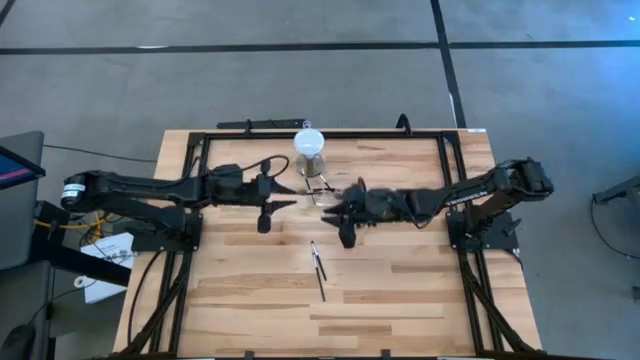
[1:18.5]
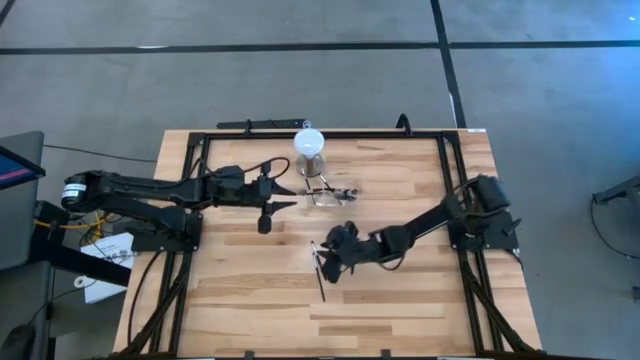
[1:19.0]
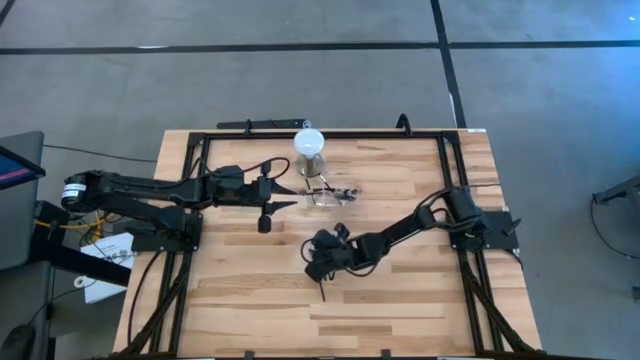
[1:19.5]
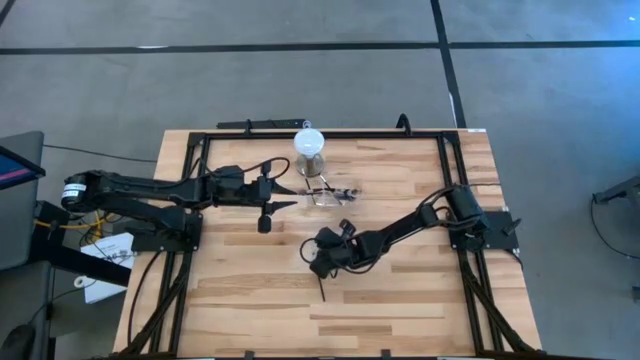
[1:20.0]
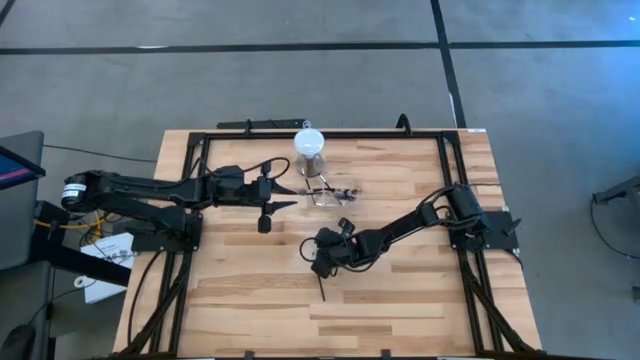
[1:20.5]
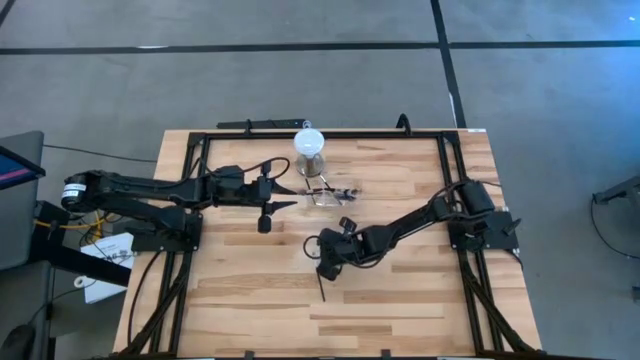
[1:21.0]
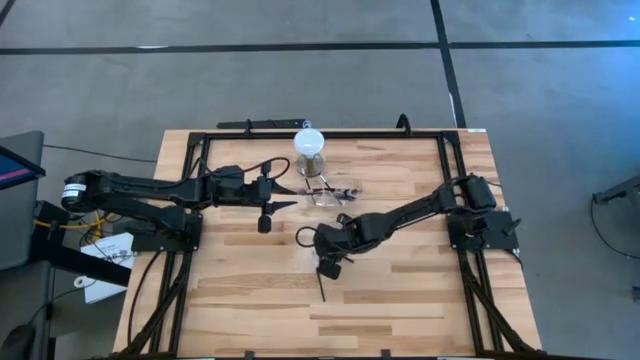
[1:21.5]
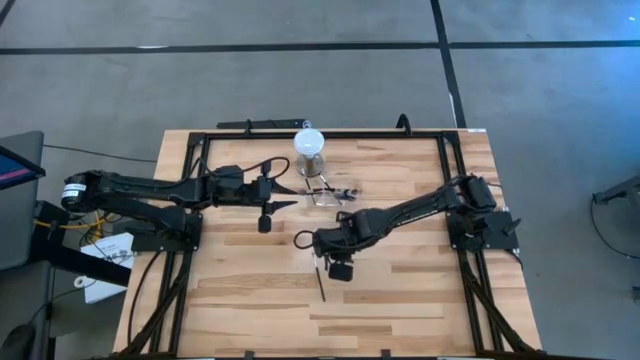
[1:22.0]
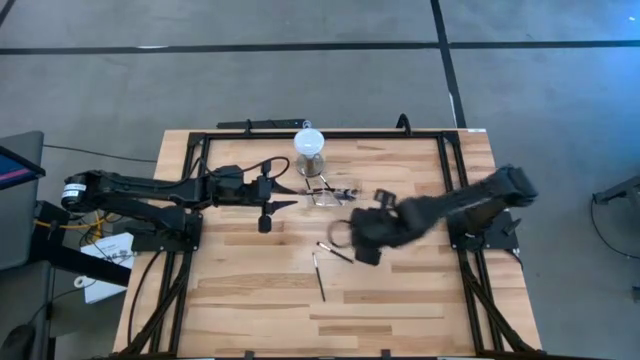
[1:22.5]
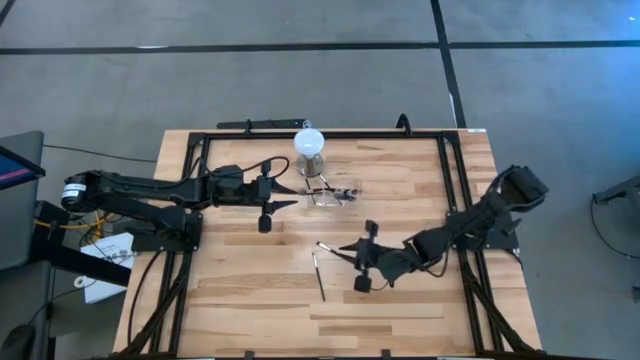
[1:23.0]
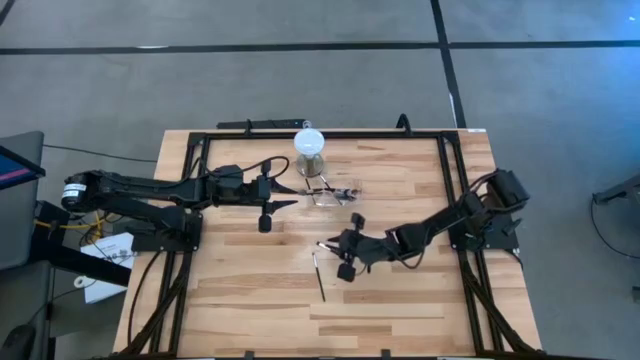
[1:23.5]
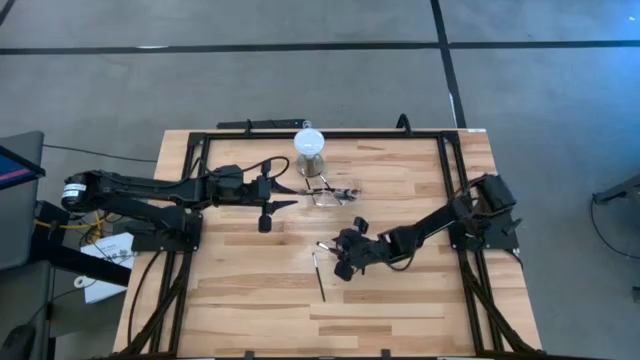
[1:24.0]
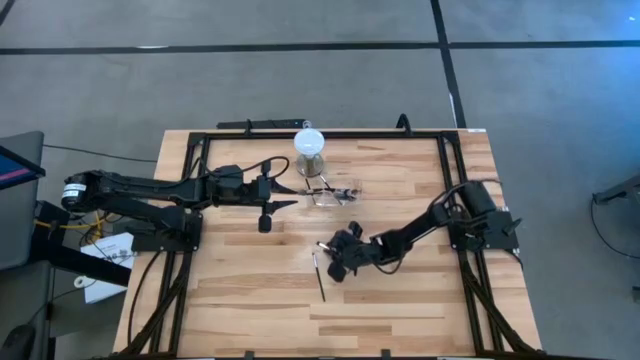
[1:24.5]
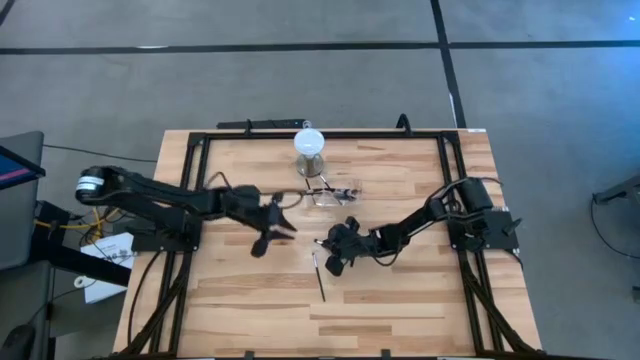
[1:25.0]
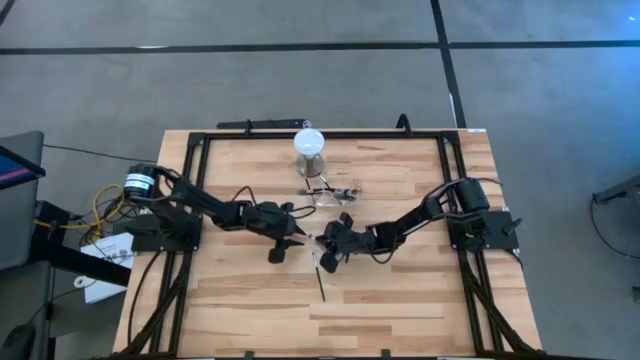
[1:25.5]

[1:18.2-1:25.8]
Task: Put items in baskets/containers
Put the black eyeshadow brush into the transparent organizer

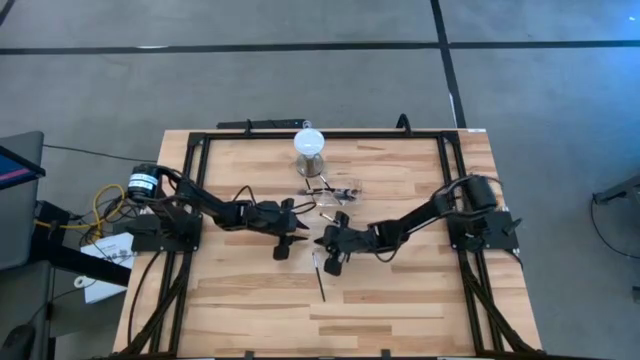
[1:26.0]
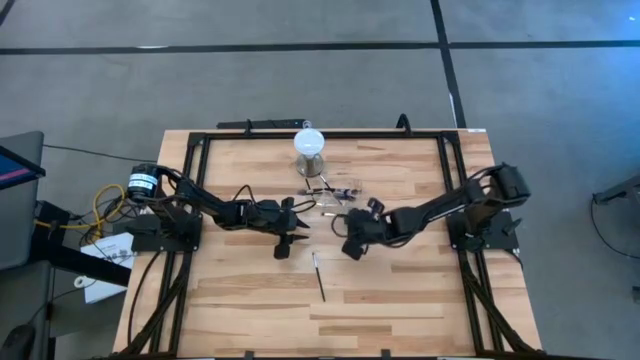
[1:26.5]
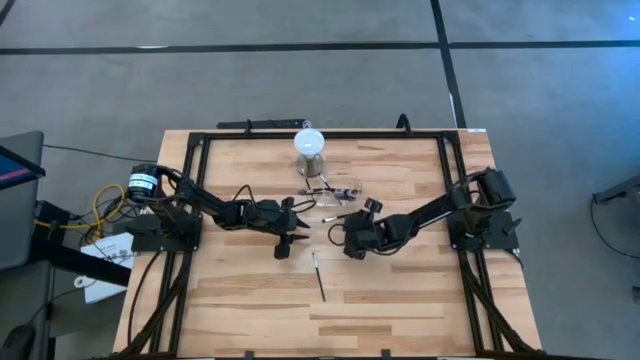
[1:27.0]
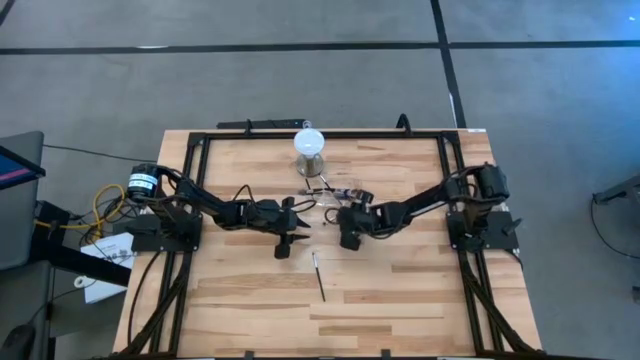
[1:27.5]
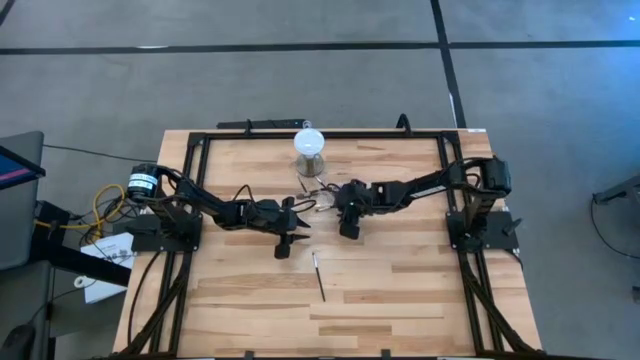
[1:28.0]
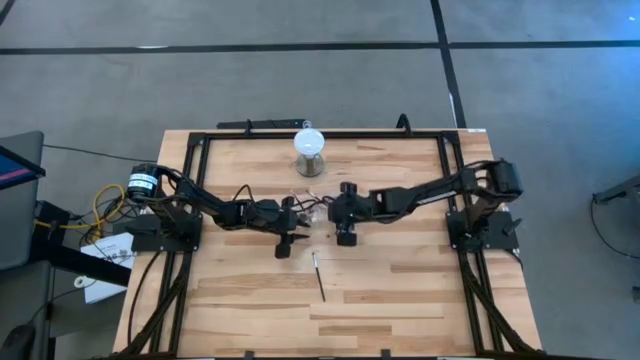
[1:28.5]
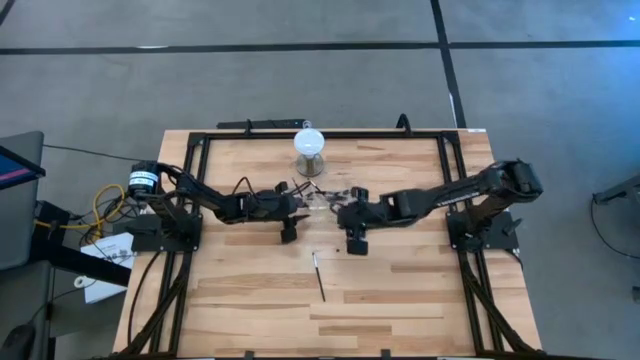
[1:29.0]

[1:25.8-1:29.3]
Adjust the transparent organizer

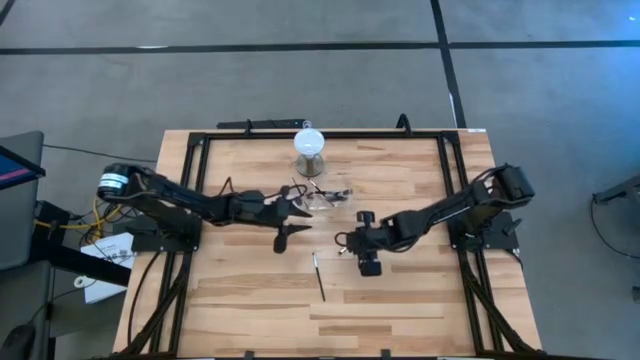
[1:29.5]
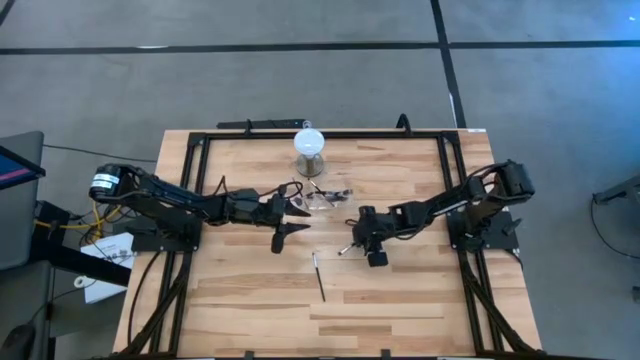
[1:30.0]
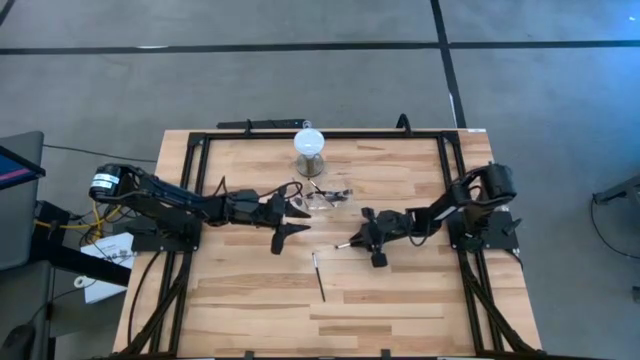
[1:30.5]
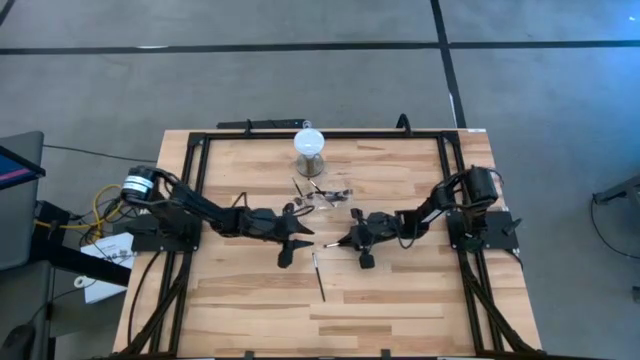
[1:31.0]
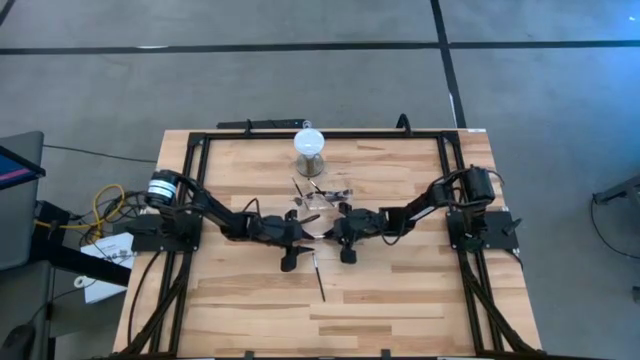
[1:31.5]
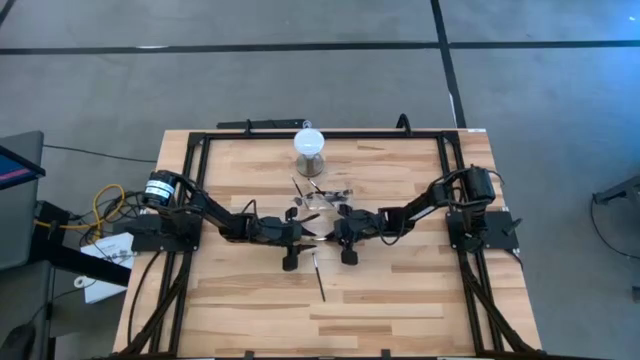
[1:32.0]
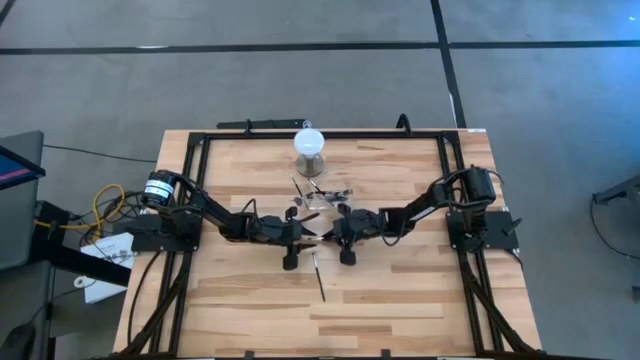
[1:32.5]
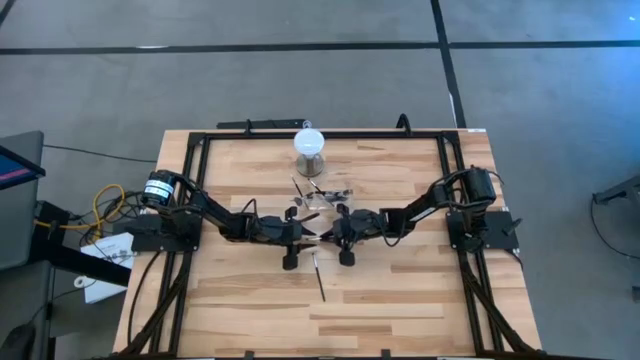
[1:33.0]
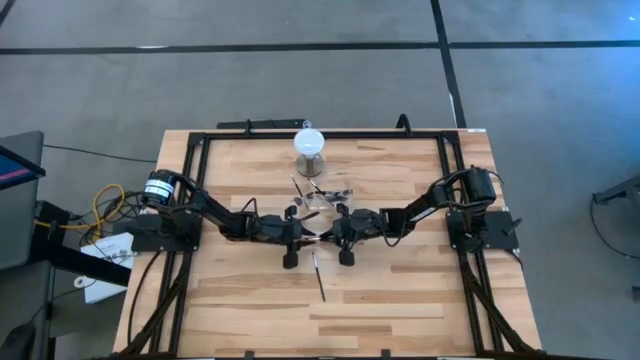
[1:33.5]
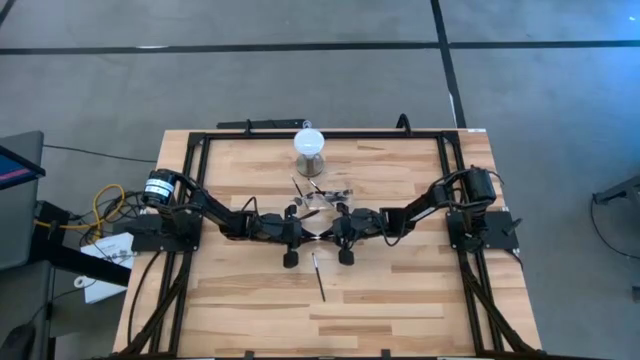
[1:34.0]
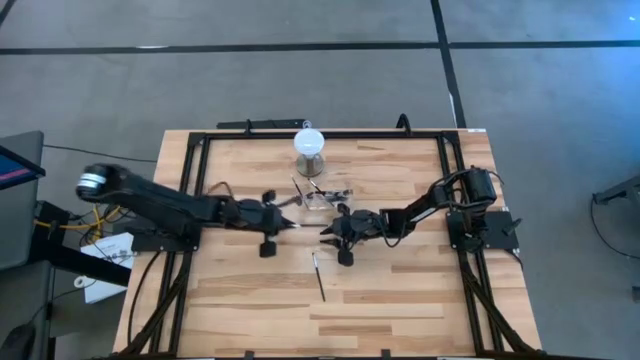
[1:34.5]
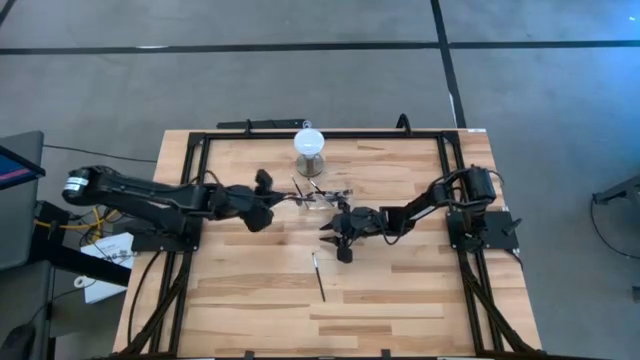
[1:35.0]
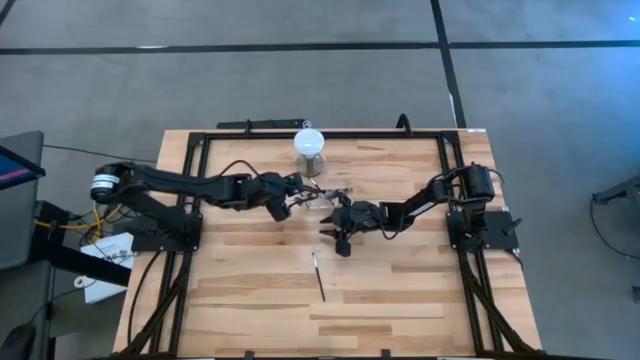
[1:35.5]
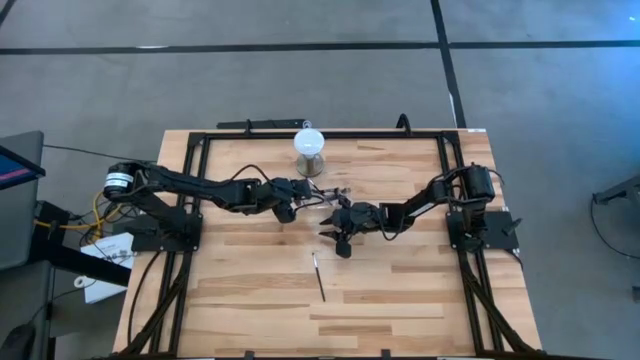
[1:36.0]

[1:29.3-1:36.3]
Put the black eyeshadow brush into the transparent organizer

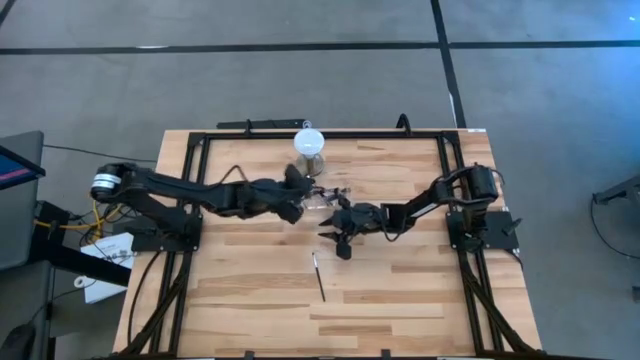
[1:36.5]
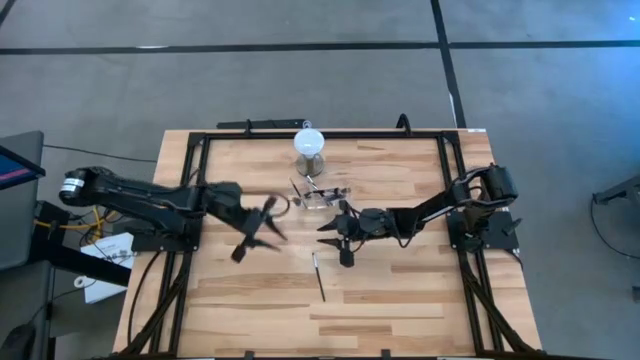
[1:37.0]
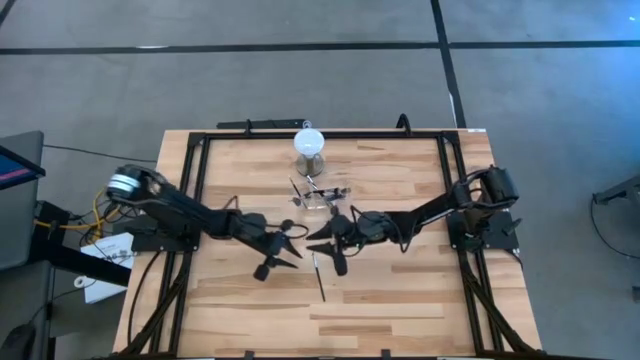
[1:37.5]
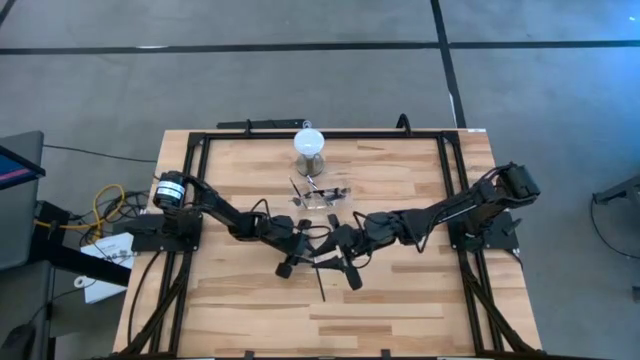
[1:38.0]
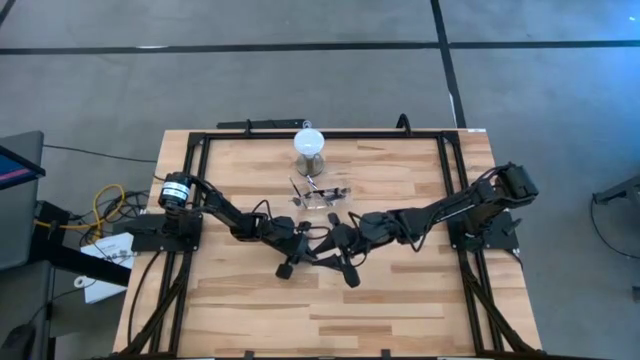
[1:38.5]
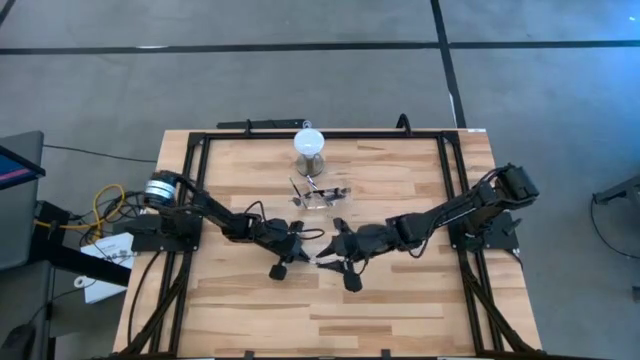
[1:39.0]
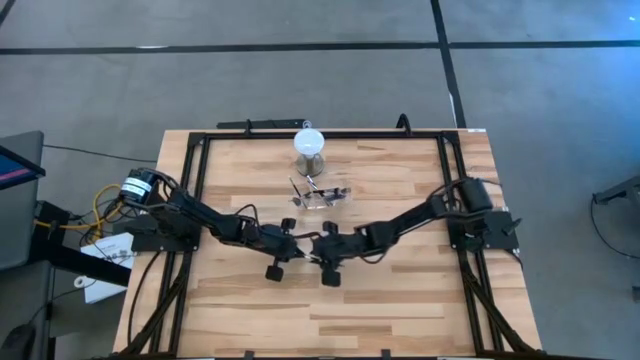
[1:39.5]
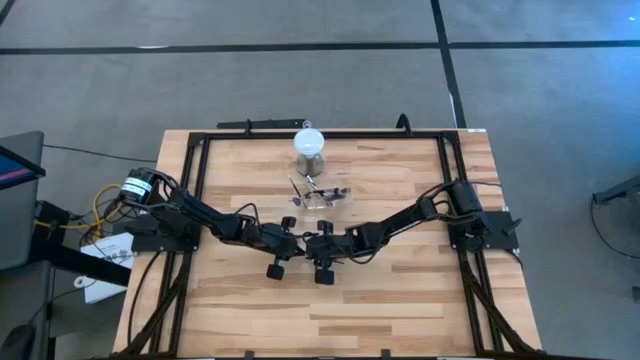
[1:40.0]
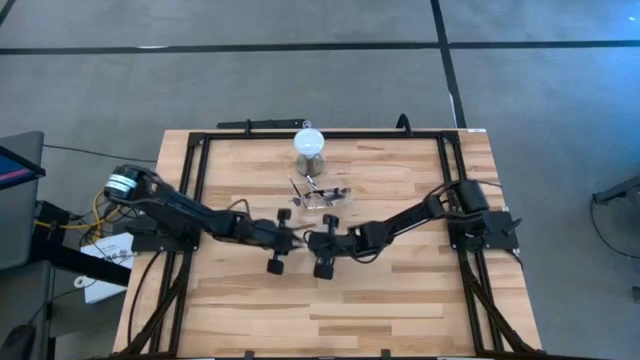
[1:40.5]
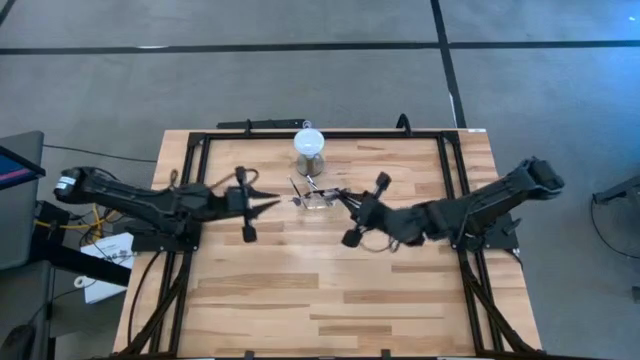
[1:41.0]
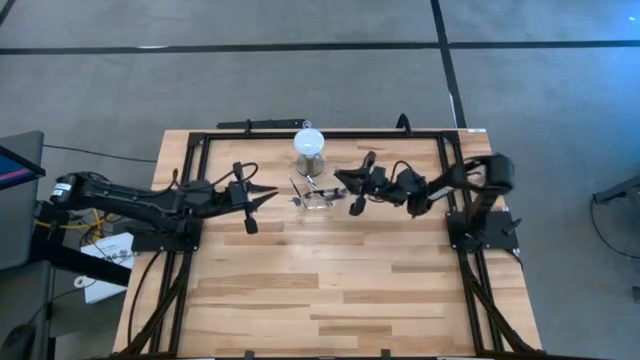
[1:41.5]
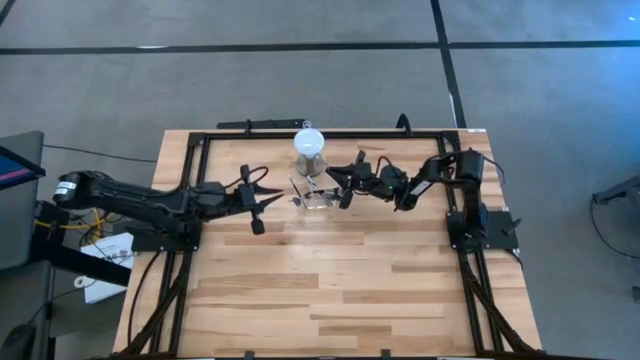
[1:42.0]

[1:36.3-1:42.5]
Put the black eyeshadow brush into the transparent storage organizer
